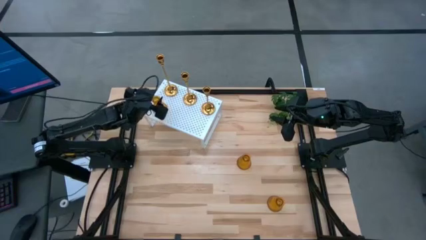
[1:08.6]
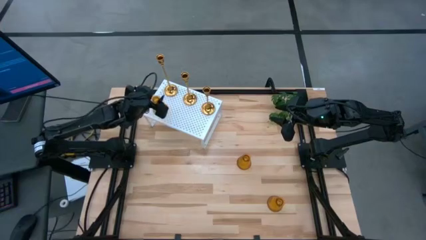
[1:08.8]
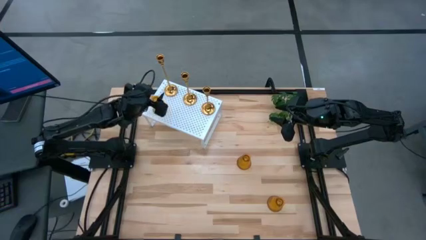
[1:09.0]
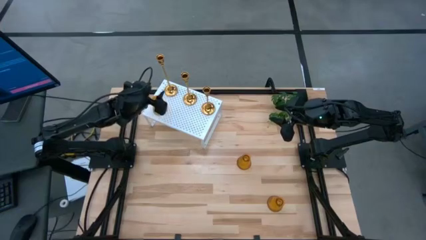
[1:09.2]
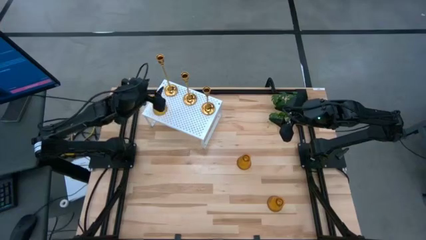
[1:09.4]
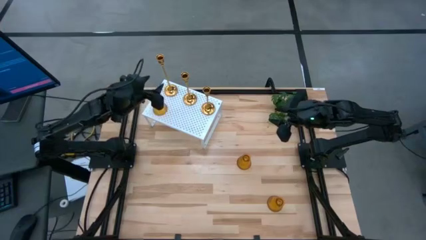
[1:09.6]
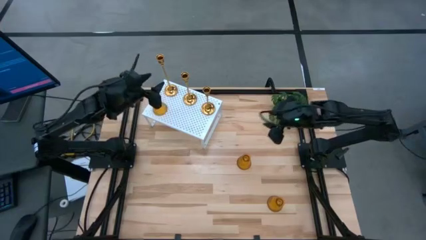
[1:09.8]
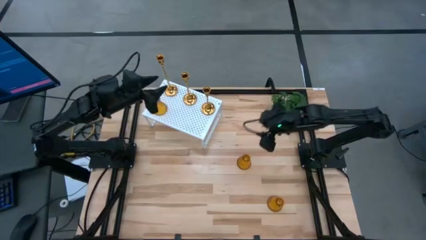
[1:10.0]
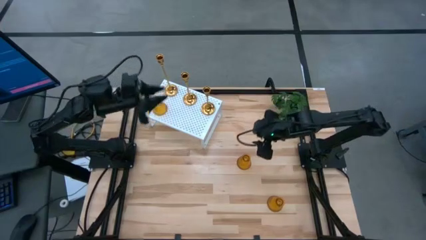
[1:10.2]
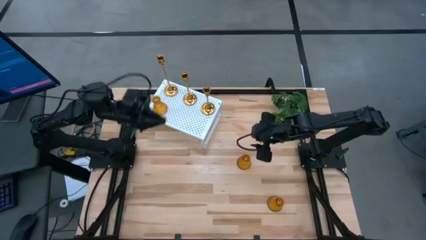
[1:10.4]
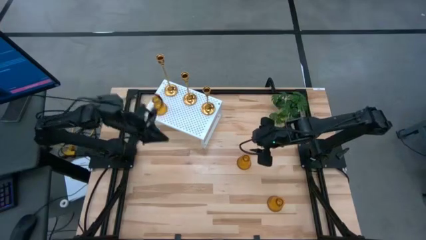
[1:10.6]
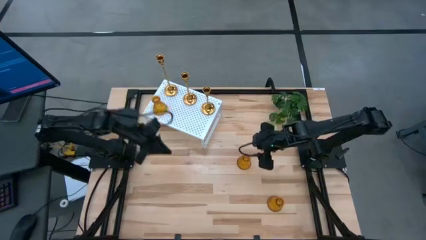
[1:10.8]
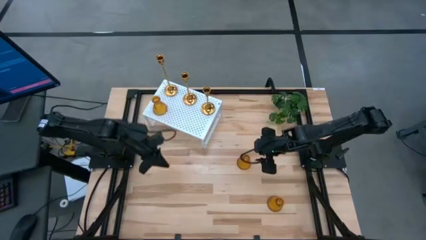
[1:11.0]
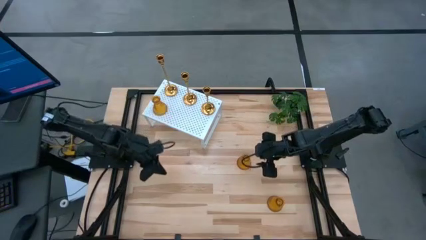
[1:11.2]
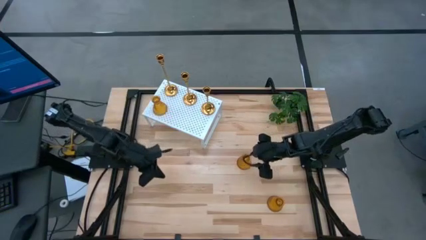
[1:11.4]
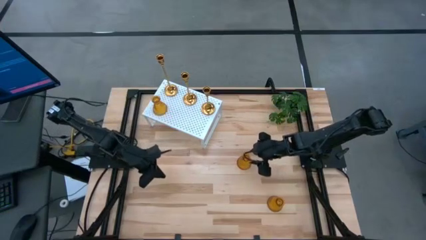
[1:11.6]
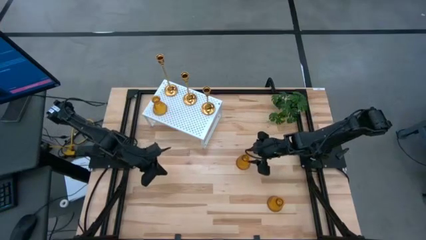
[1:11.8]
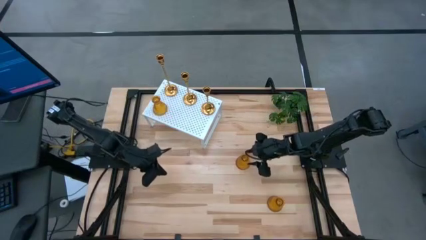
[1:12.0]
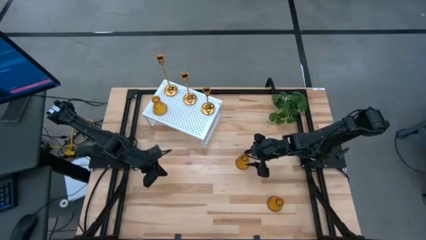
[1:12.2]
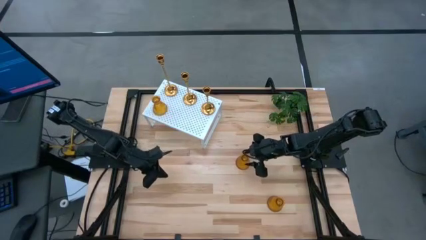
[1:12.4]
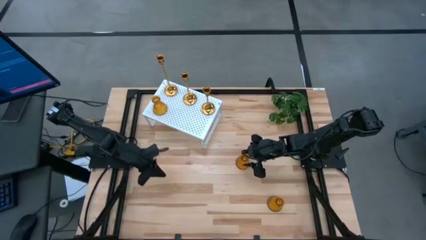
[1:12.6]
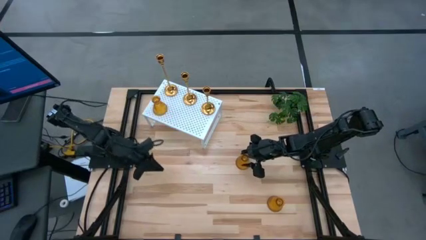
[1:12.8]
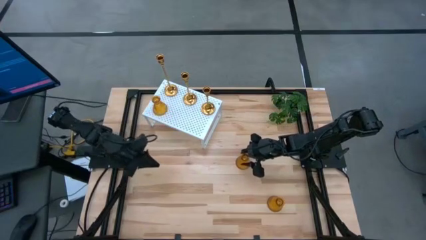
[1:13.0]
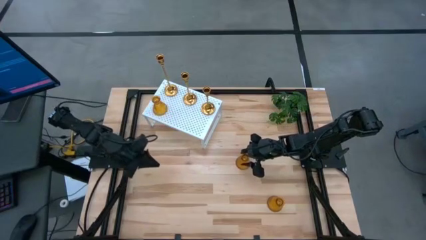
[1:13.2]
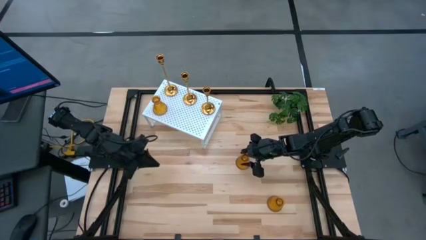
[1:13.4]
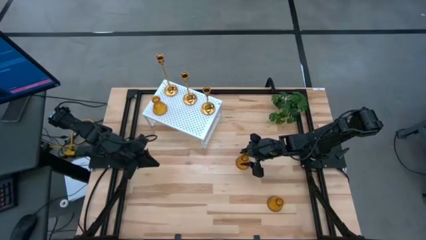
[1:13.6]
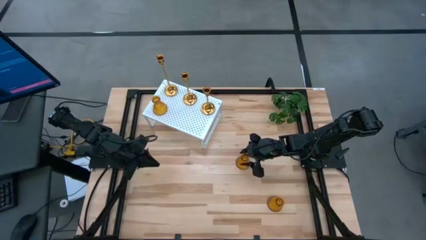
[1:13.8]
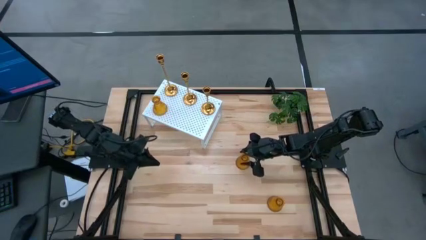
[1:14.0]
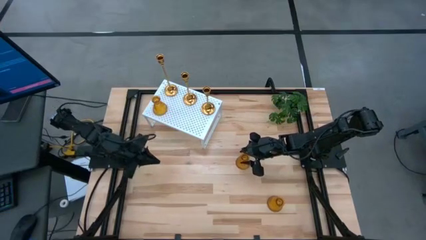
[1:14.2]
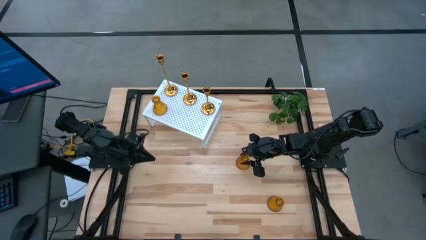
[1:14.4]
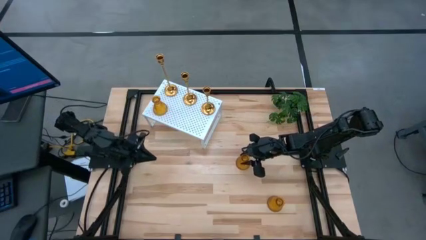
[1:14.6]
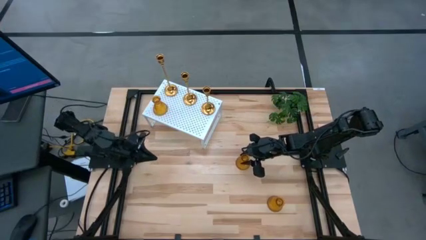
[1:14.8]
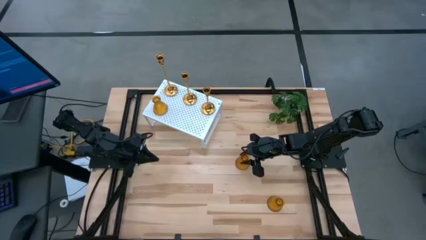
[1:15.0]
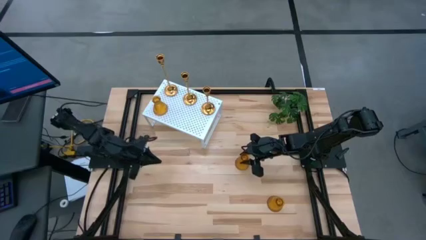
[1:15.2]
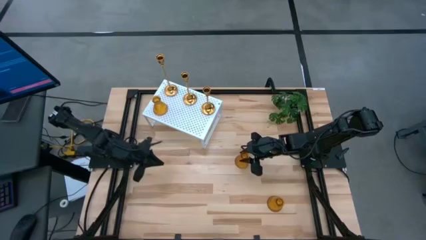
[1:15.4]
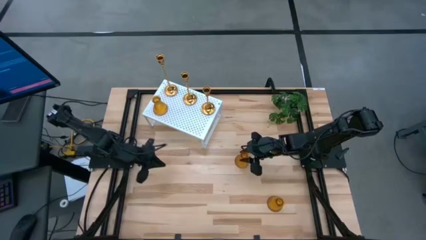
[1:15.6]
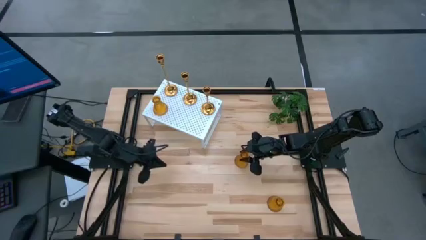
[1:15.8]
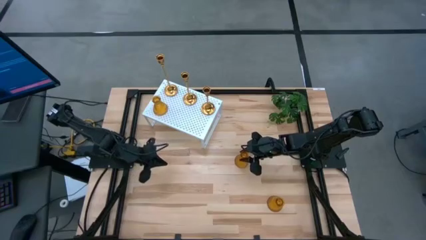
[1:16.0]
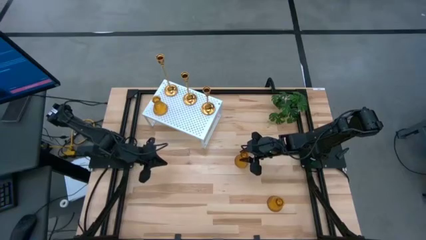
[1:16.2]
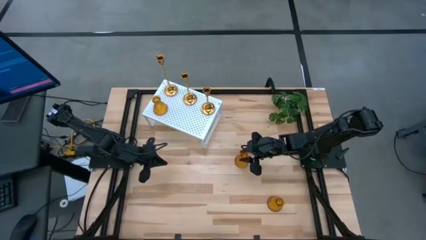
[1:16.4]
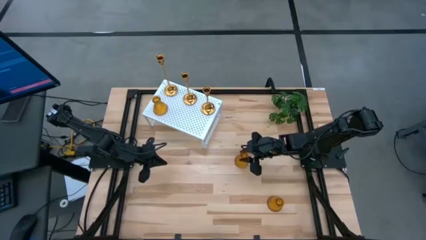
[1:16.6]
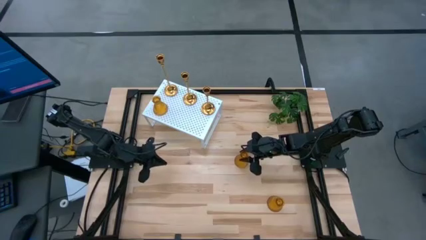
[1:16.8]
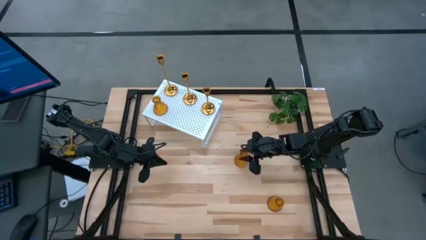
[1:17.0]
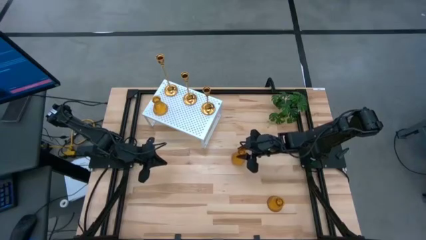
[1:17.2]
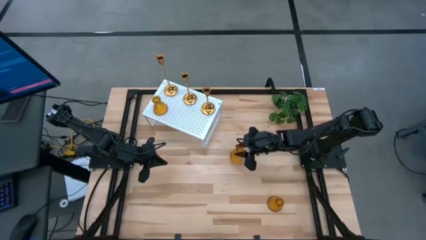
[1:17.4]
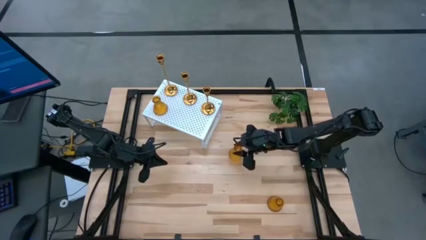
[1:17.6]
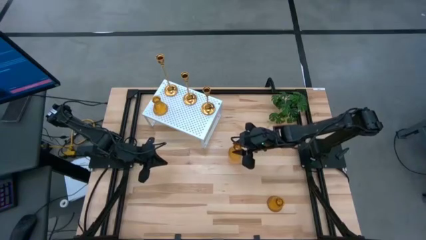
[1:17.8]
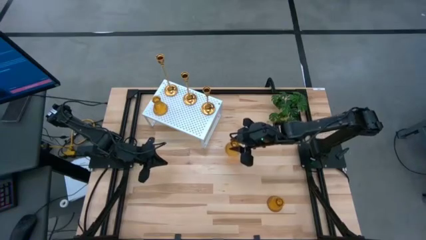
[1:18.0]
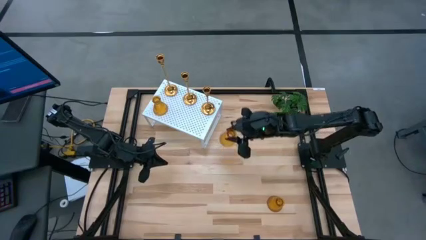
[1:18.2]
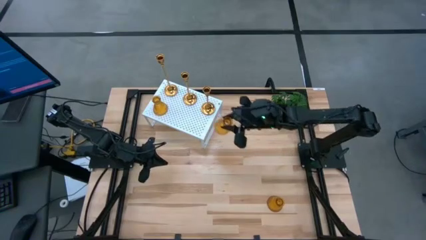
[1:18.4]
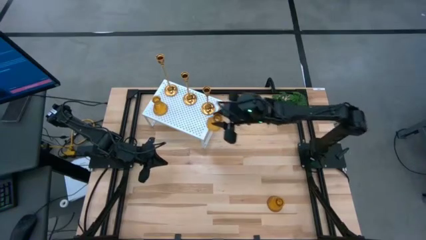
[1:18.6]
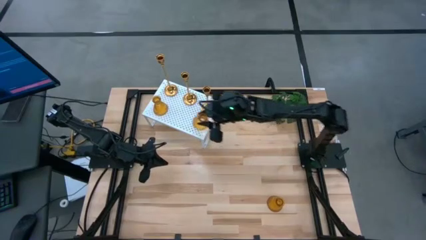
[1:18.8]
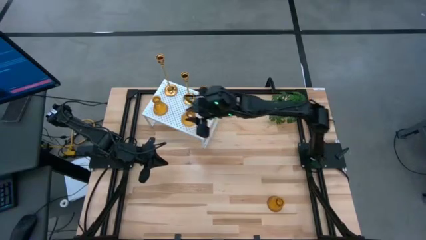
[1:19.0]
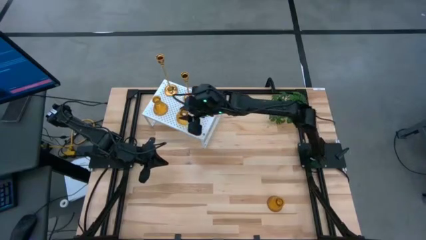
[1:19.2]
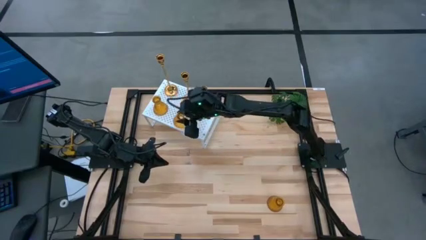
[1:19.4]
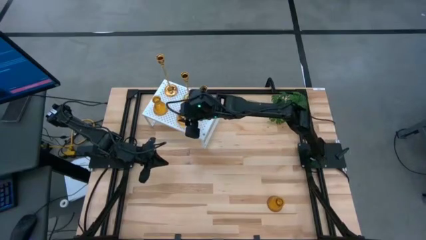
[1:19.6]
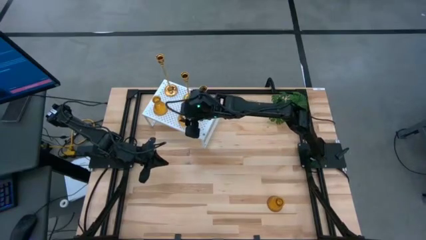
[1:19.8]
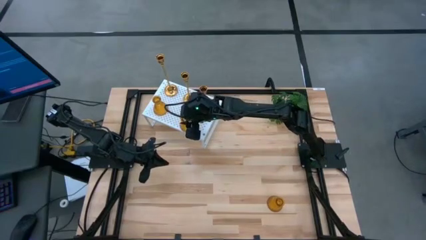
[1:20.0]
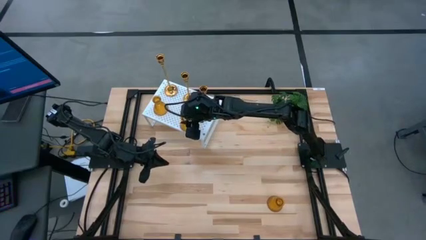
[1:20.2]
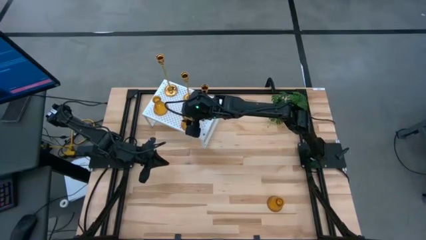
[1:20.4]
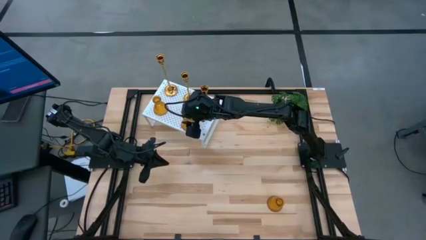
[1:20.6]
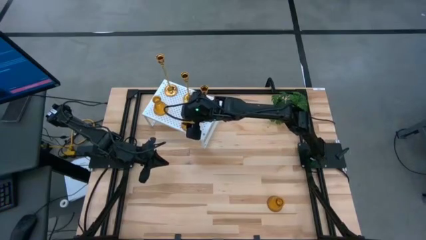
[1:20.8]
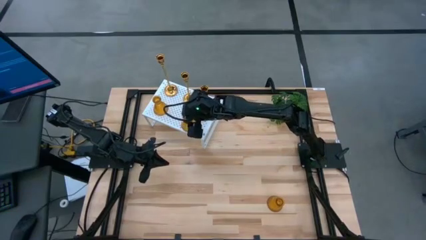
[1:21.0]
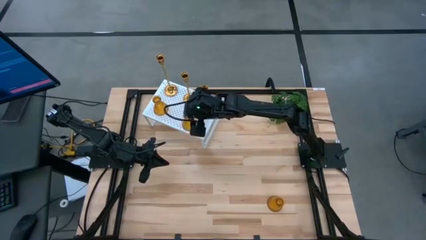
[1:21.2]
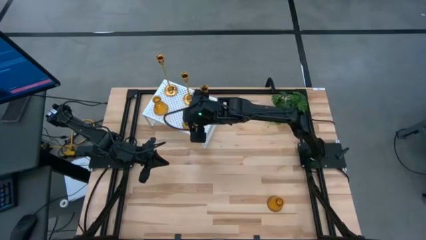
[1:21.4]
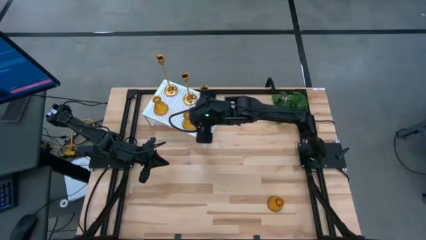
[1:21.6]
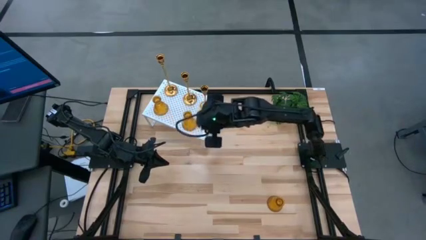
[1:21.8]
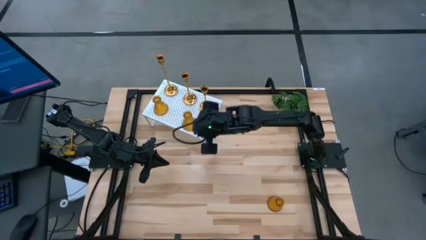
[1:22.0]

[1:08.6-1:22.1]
Task: Pick & Place candle stick holders
Put the top brown glass candle holder on the shelf aligned with the other brown glass candle holder

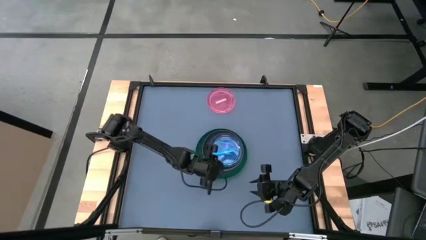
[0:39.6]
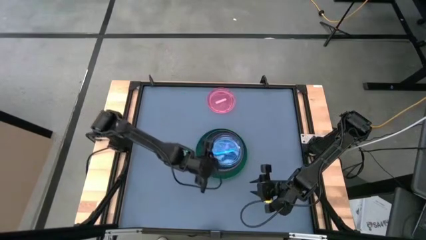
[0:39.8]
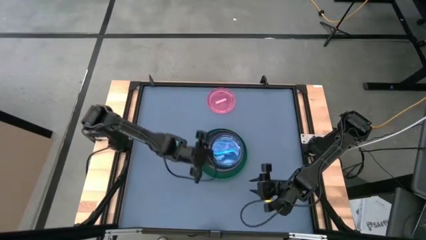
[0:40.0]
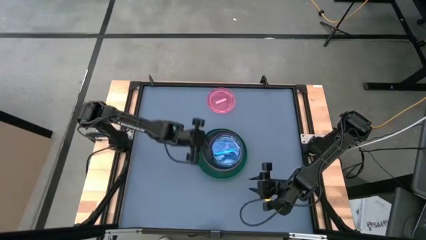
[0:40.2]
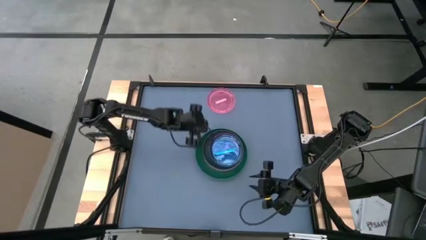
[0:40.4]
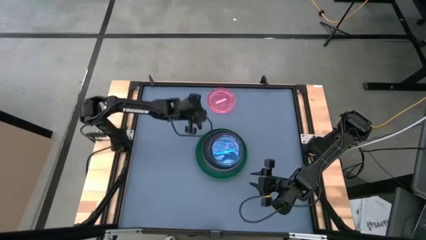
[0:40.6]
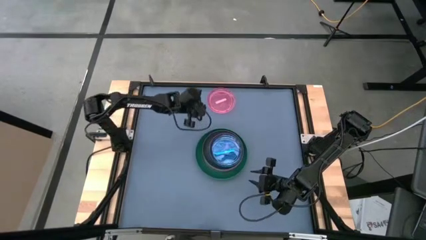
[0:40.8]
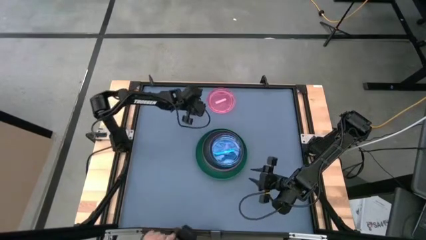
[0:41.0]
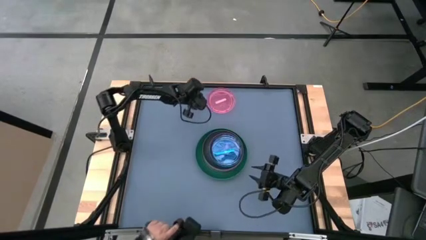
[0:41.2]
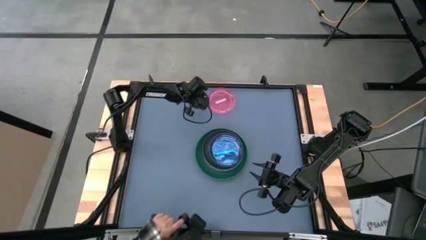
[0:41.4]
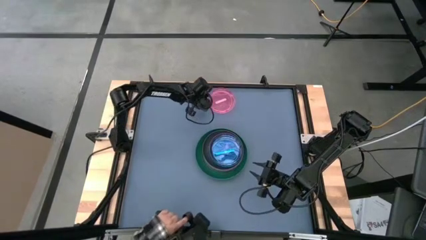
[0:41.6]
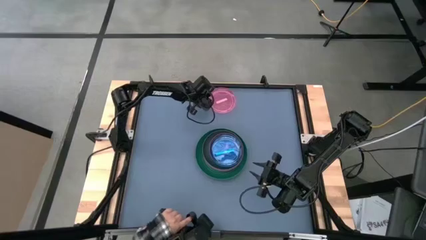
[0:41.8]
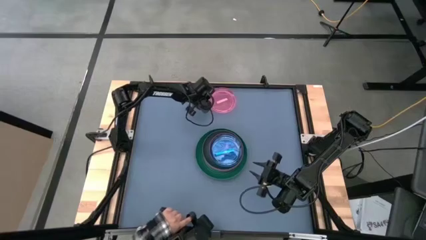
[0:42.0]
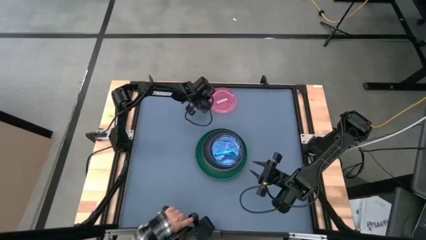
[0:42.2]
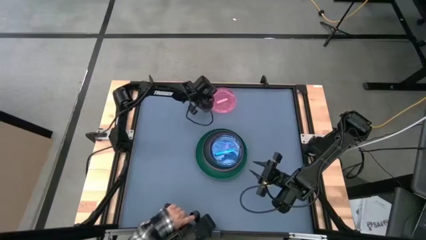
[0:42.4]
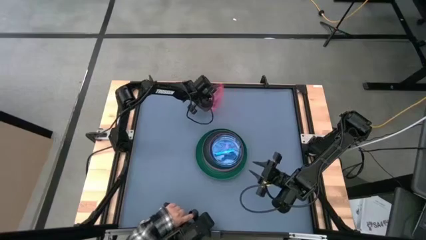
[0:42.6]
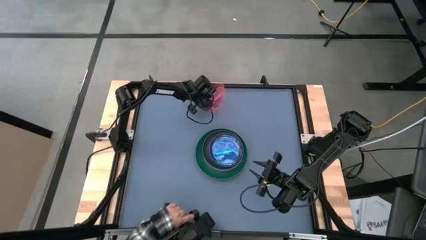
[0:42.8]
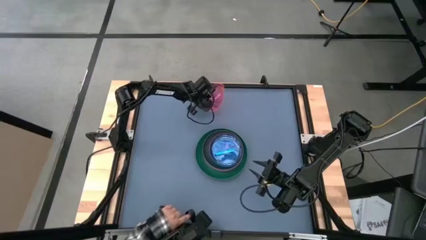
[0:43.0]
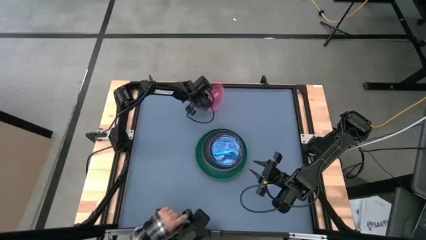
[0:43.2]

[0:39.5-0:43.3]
Task: Stack plastic plates
Stack the pink plate on top of the blue plate
